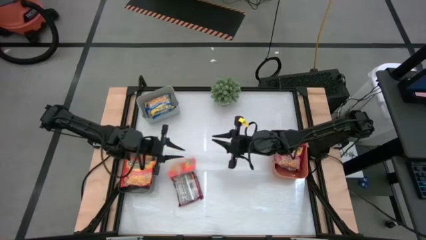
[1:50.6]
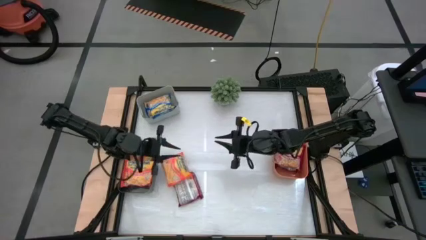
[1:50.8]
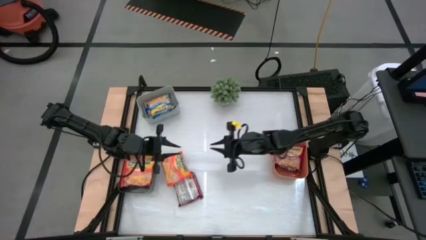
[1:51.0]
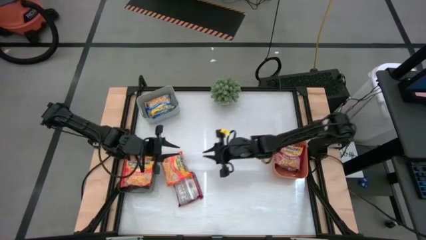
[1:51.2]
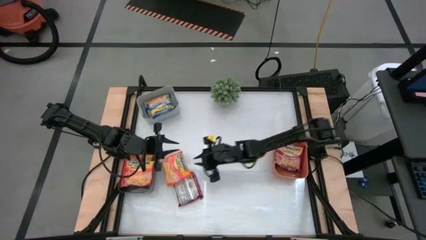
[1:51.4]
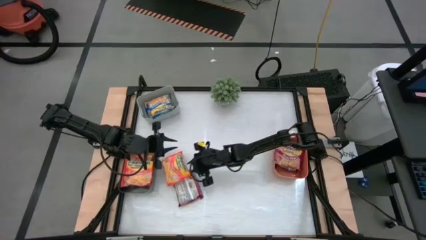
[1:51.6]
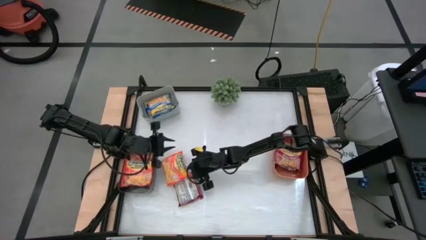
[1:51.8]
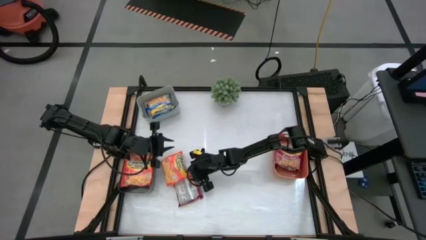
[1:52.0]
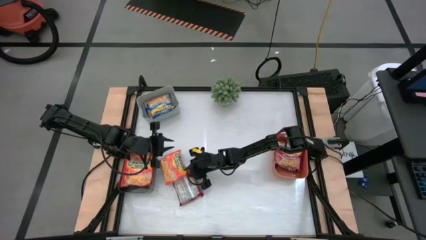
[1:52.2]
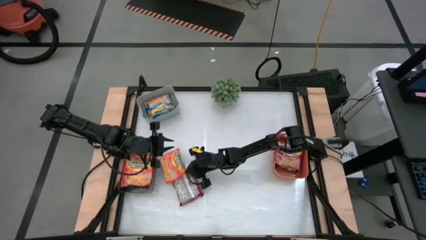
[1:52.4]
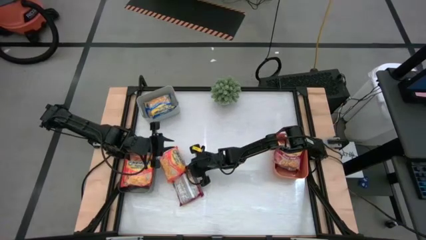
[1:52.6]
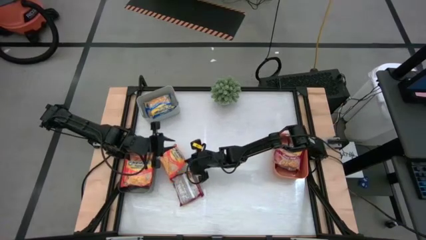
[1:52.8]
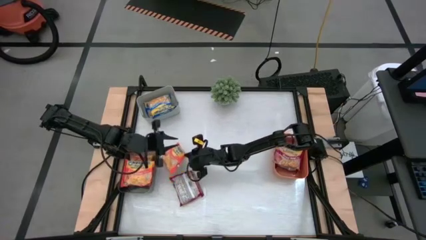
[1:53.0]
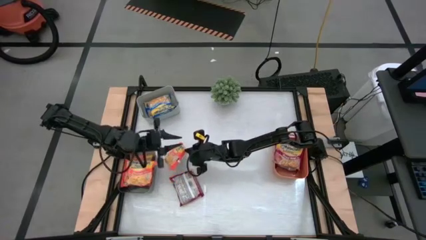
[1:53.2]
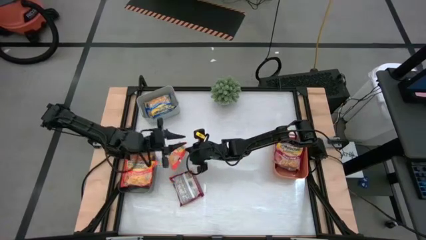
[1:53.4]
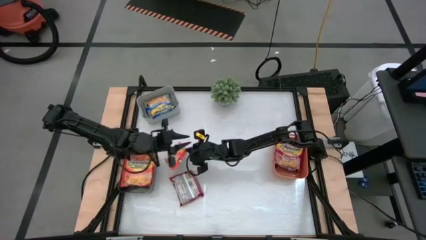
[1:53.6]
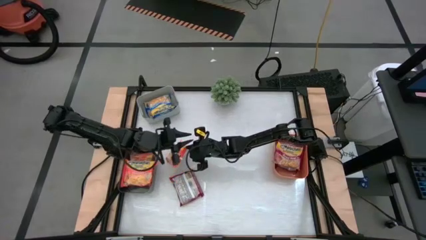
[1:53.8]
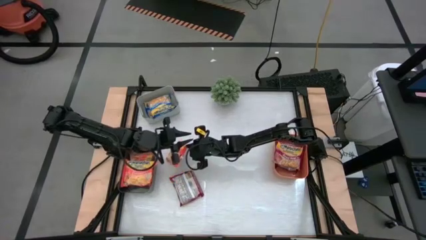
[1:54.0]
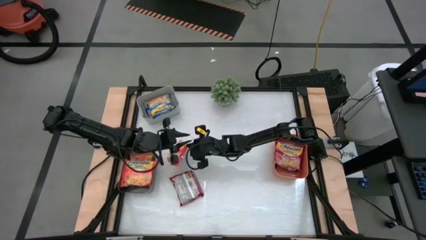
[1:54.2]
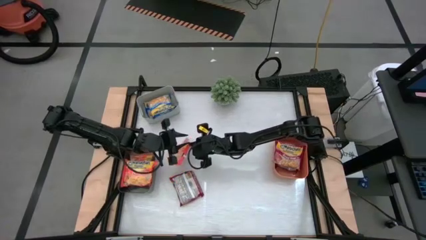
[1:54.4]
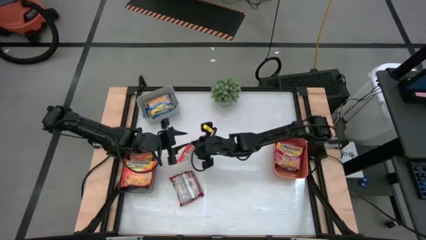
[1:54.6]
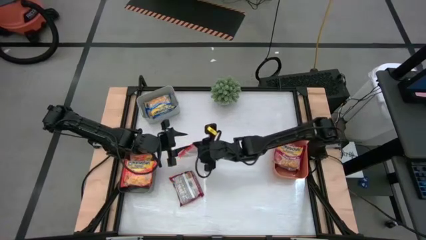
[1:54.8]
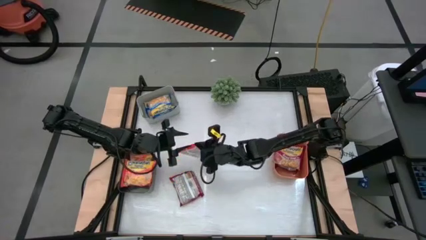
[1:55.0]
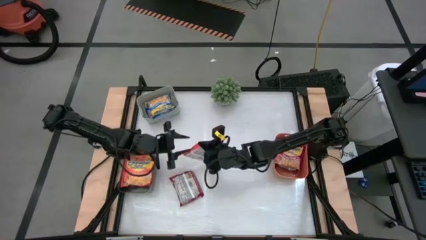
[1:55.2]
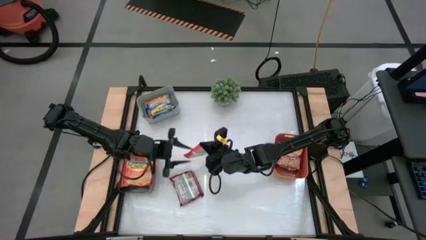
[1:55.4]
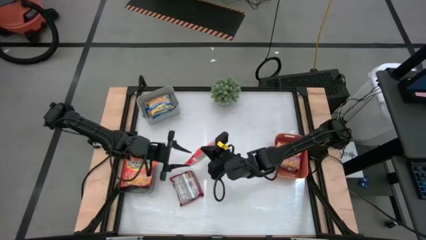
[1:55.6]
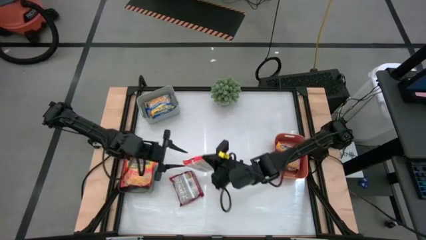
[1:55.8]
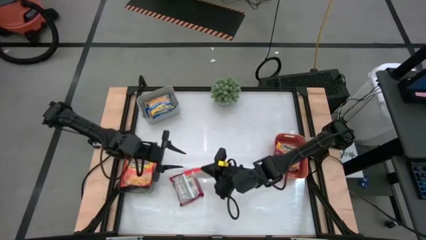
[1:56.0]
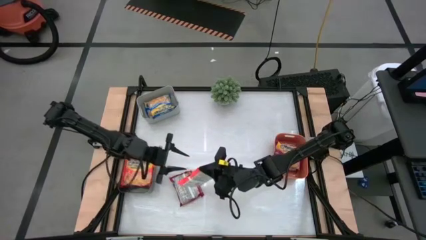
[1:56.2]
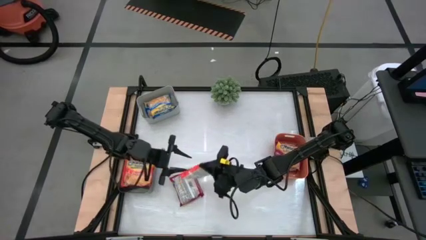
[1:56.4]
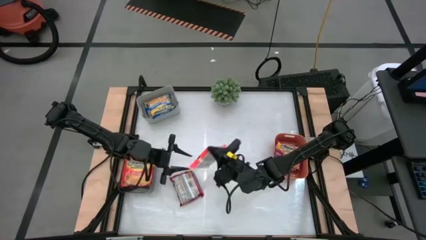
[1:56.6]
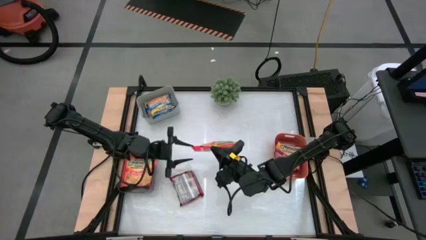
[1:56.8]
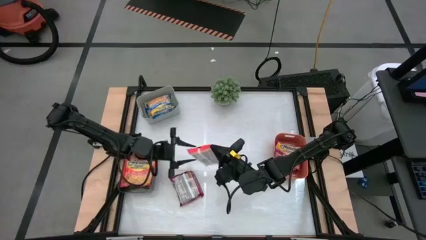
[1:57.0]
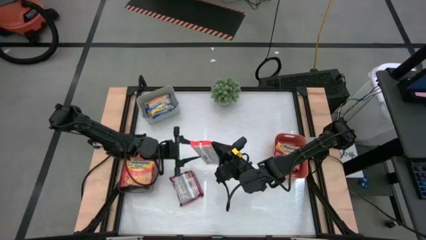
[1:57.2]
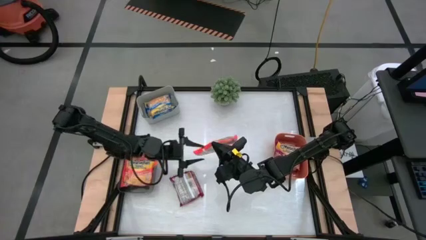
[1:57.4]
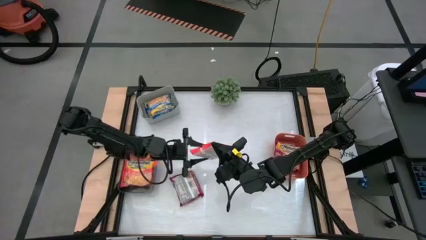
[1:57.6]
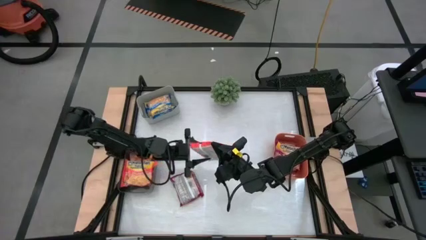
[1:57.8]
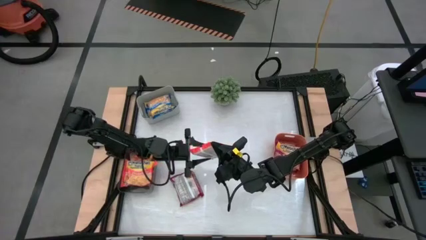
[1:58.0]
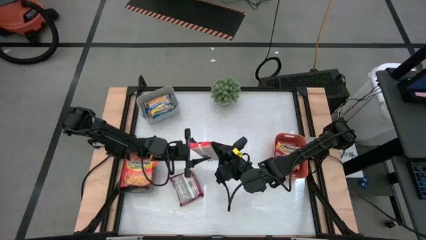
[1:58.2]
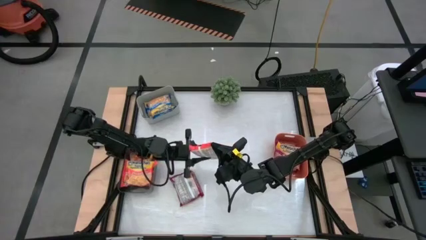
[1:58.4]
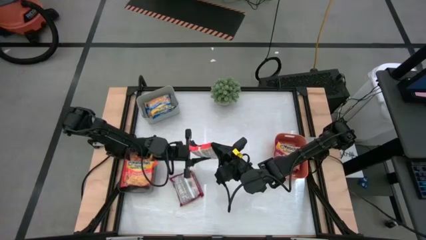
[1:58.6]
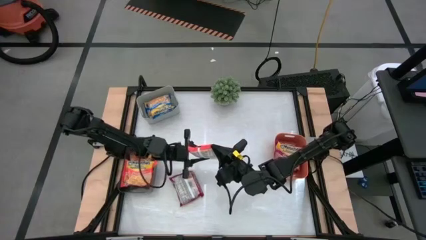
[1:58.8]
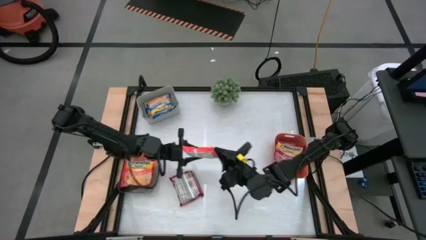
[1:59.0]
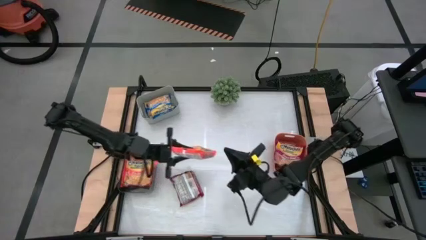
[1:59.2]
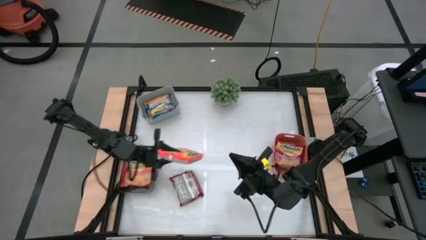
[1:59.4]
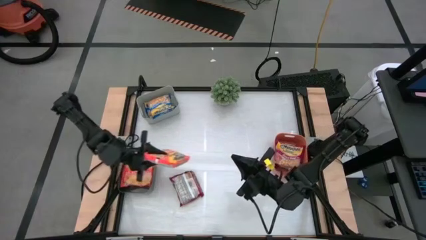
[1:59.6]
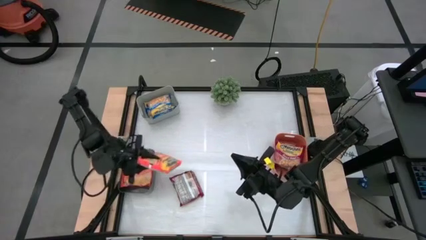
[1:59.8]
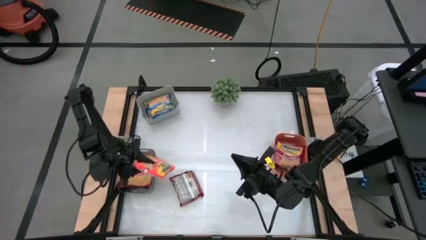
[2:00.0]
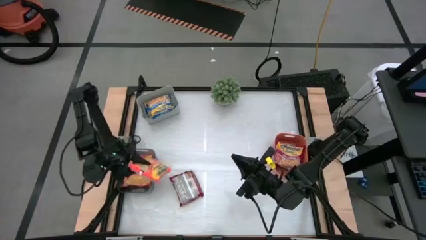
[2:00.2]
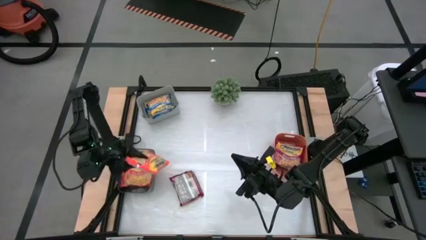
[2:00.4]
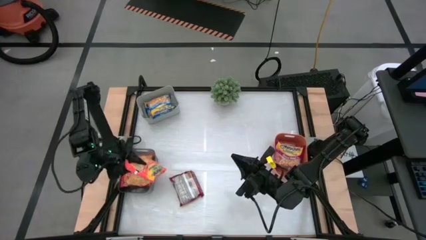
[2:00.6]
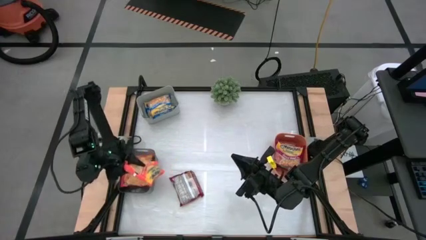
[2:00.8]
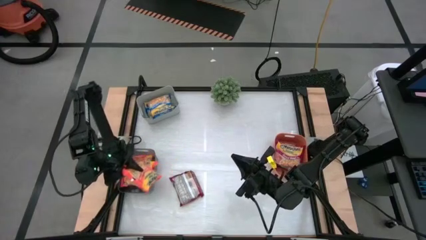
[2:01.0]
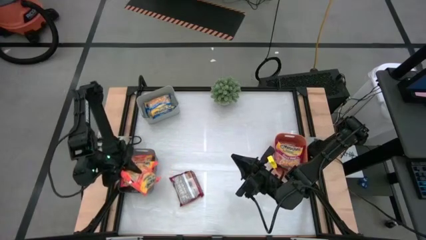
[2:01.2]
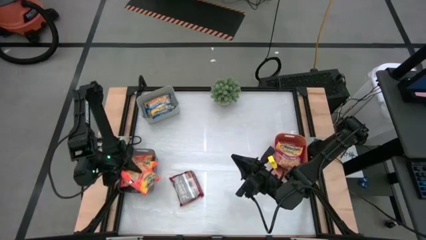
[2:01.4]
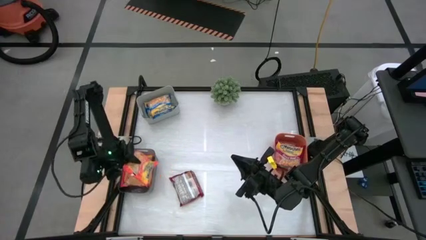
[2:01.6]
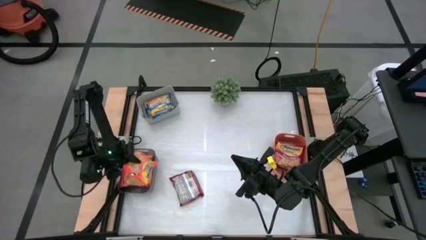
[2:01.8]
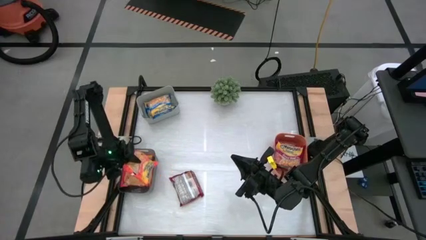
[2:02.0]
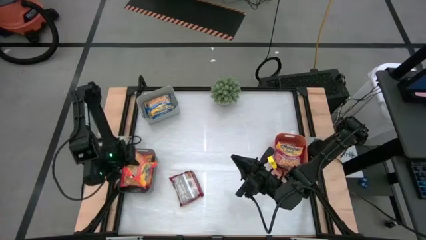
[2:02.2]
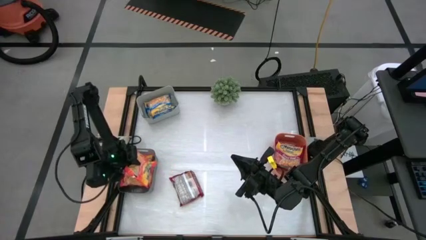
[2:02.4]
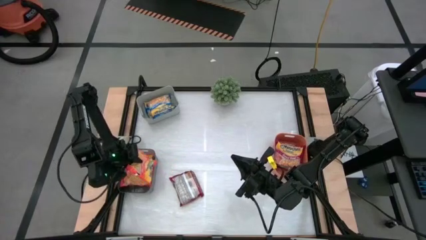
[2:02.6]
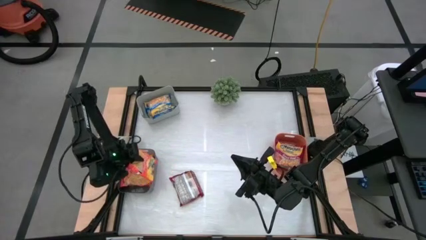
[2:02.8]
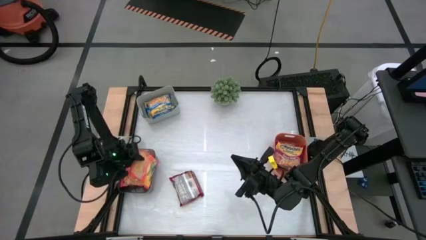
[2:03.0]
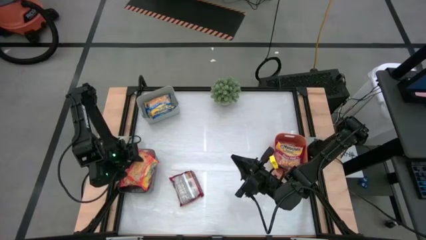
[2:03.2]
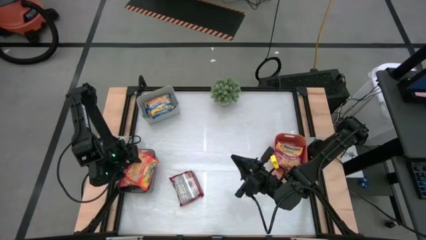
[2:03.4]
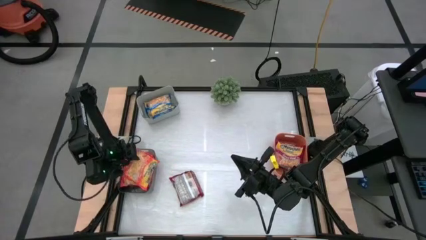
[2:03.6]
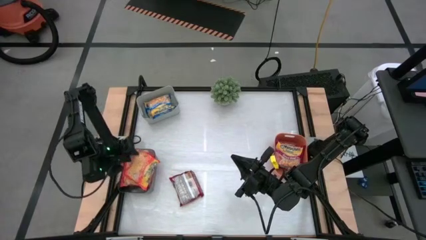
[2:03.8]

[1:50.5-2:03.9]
Task: Sort Maruchan noodles
Put the orange bag into the black bin
